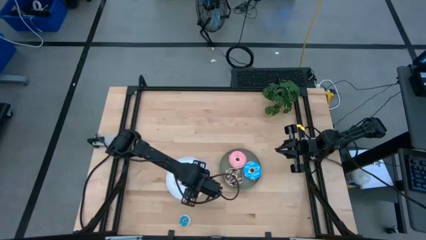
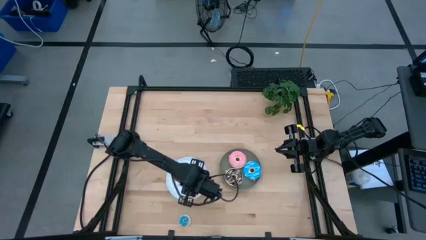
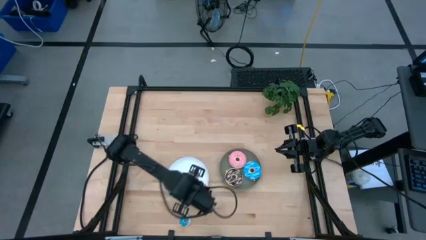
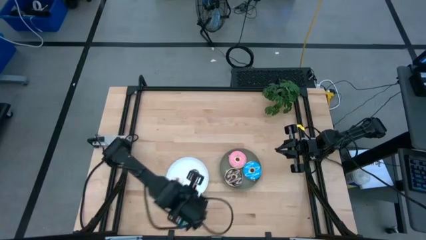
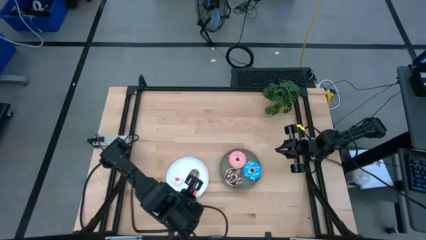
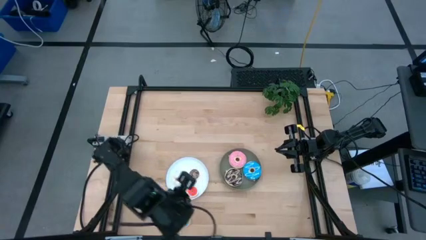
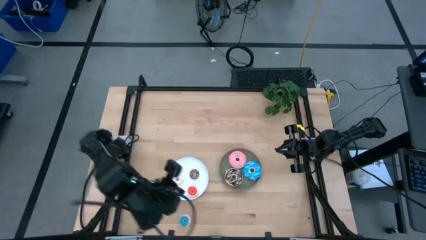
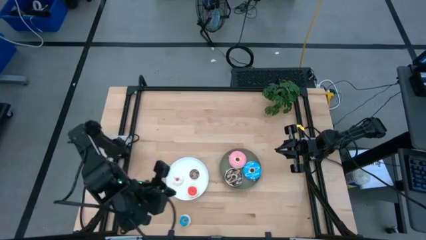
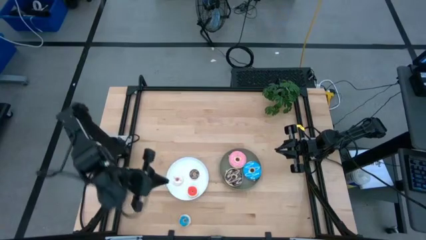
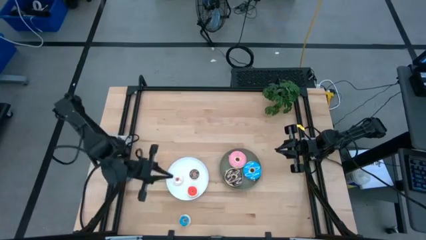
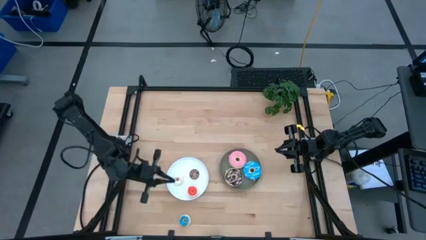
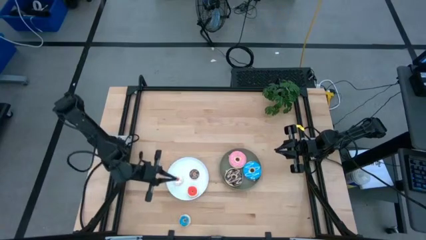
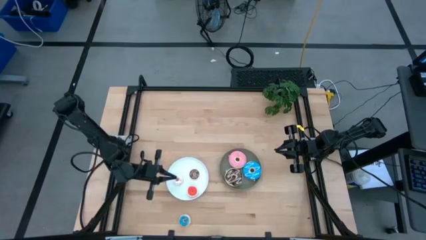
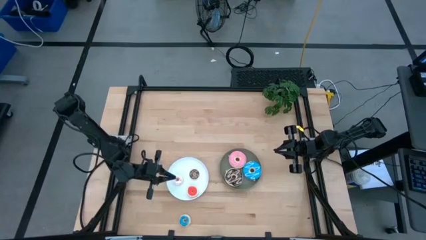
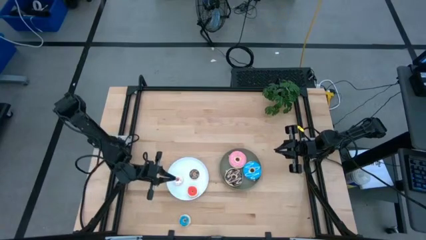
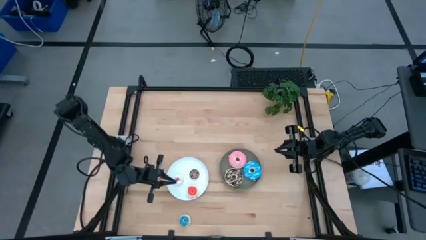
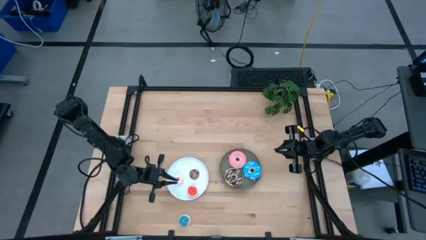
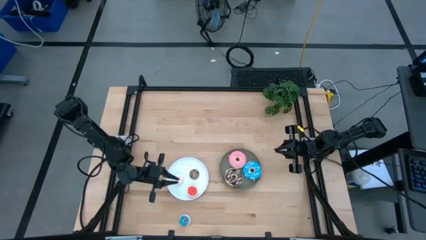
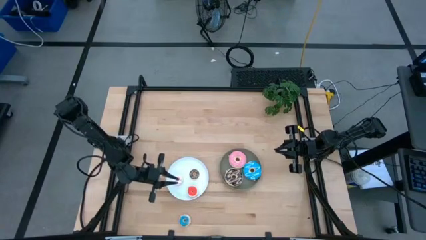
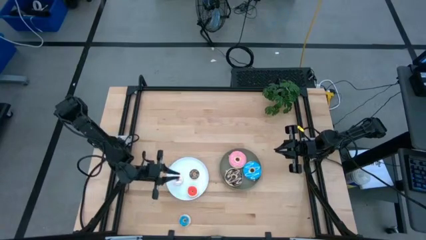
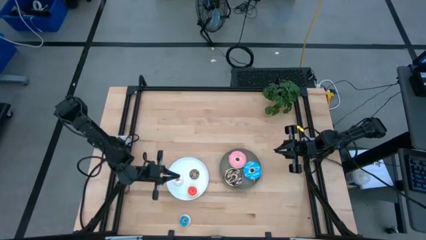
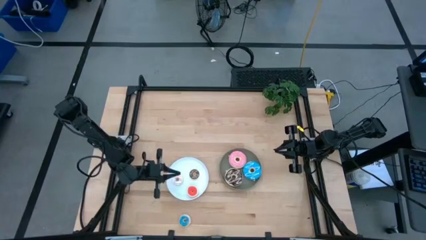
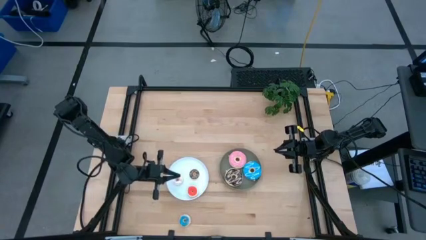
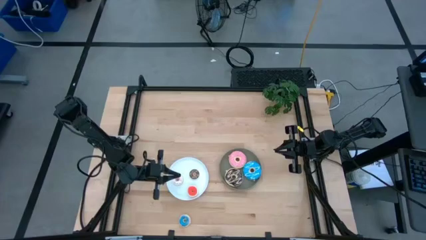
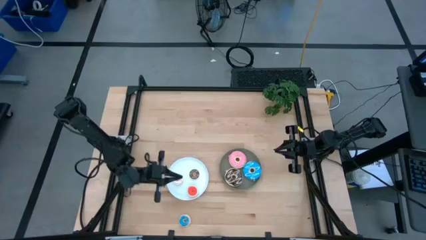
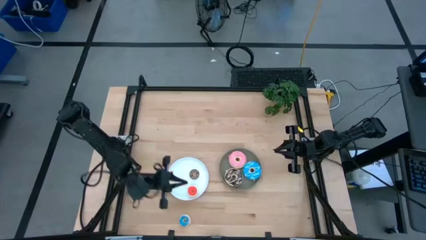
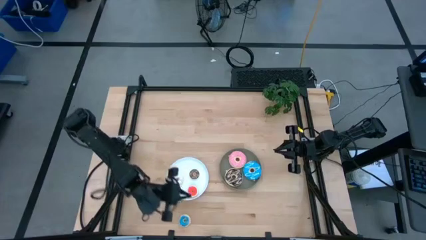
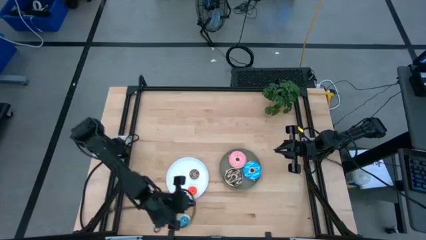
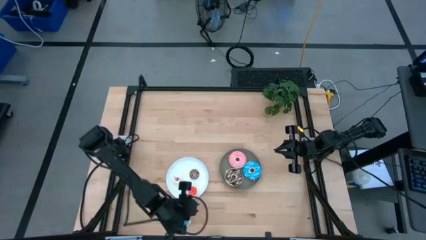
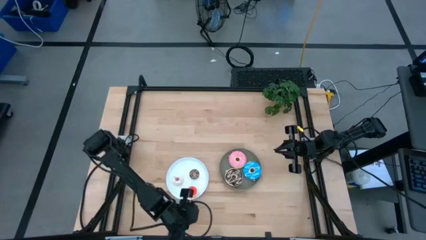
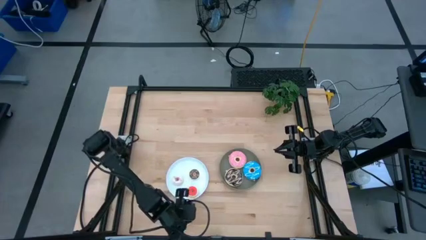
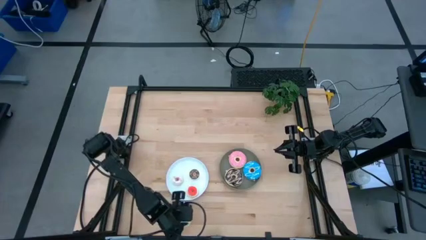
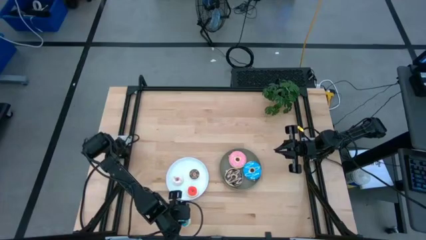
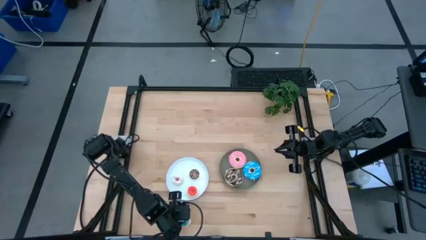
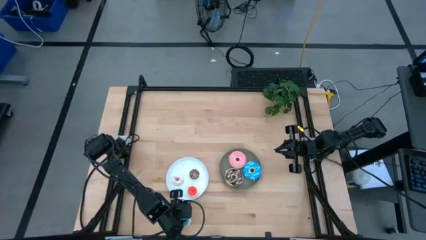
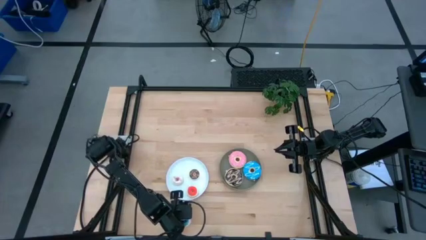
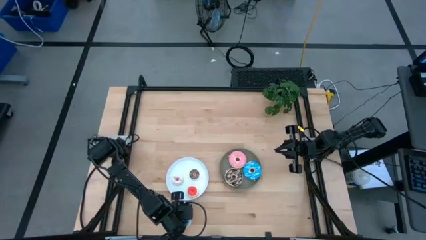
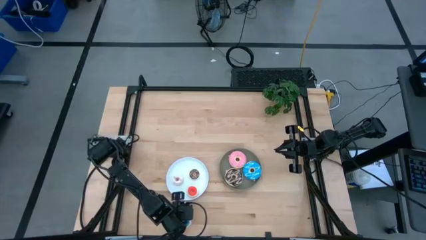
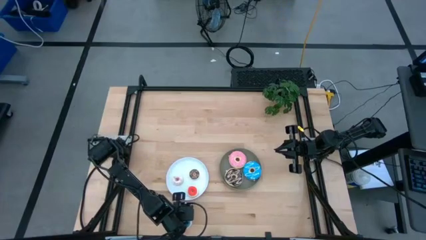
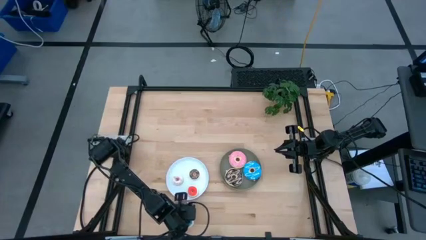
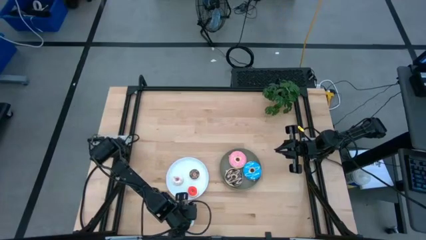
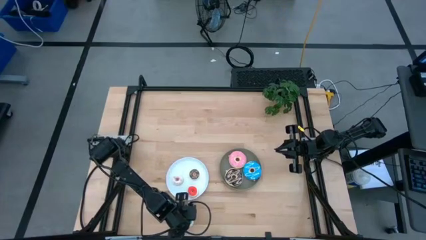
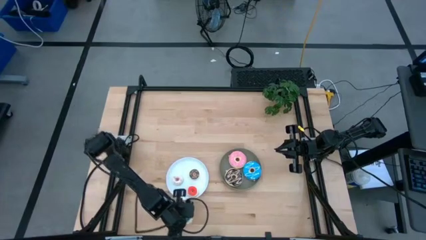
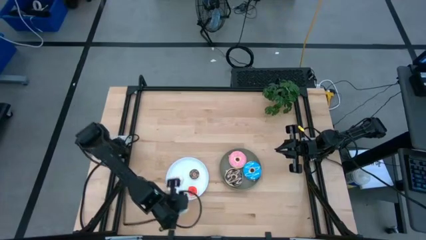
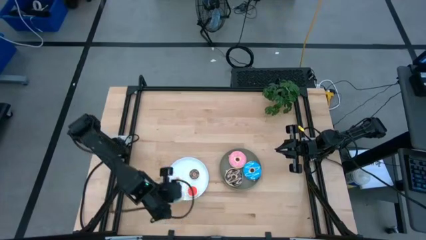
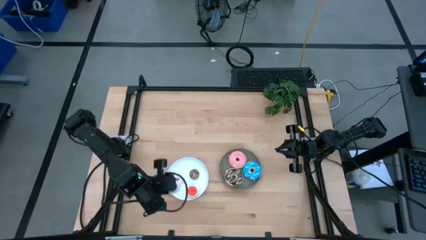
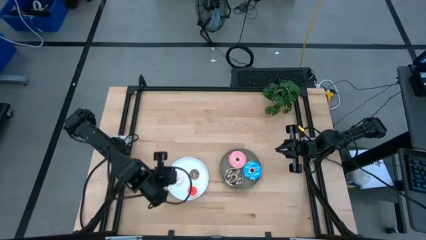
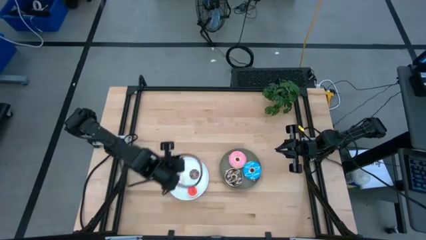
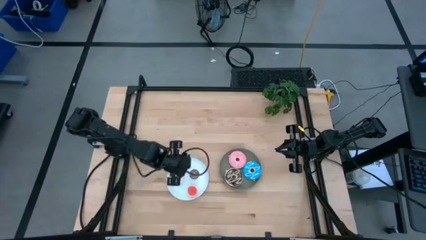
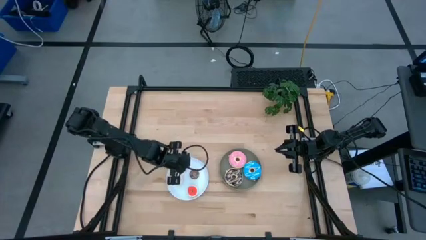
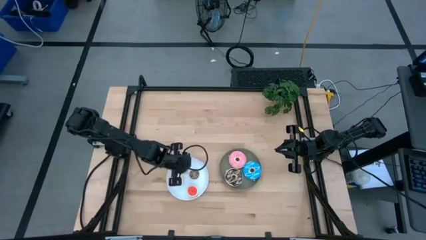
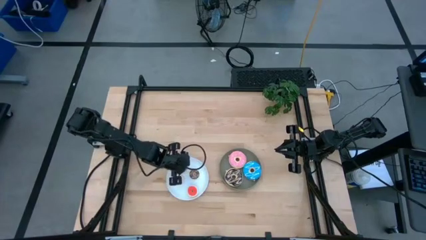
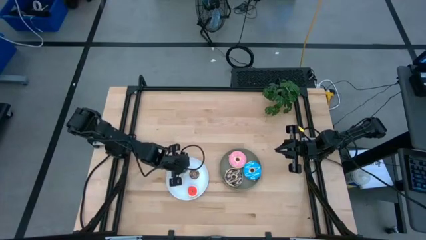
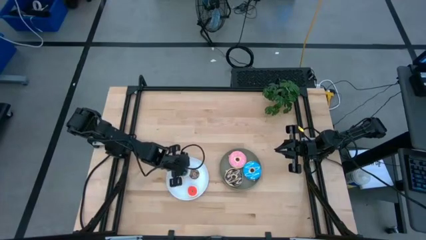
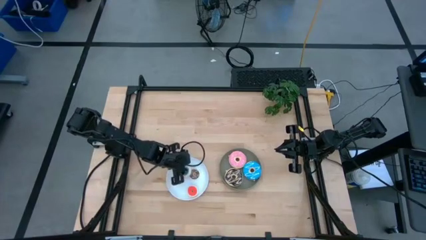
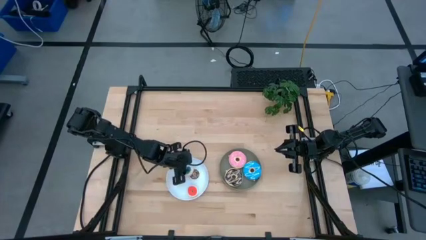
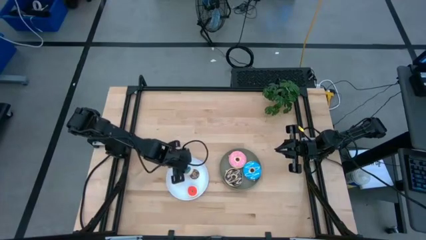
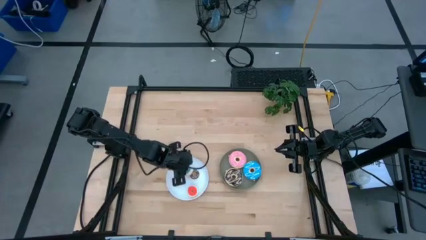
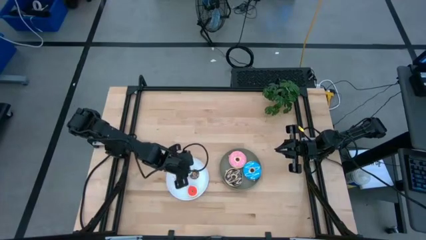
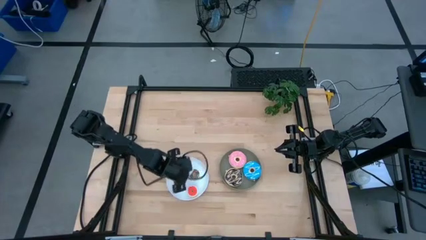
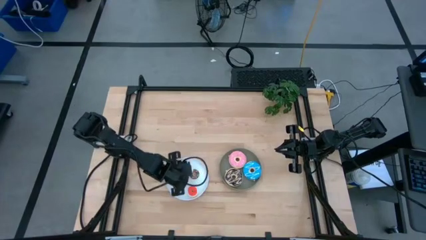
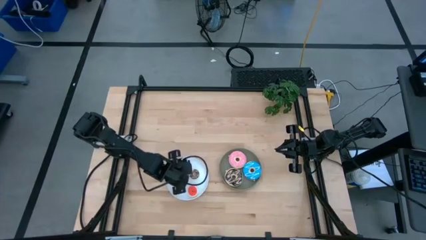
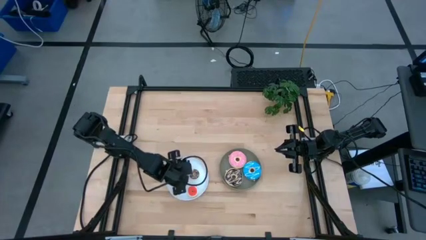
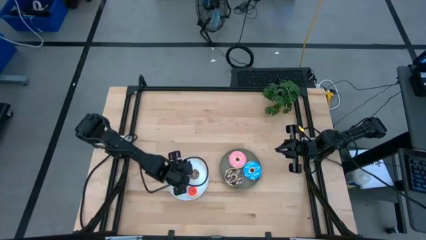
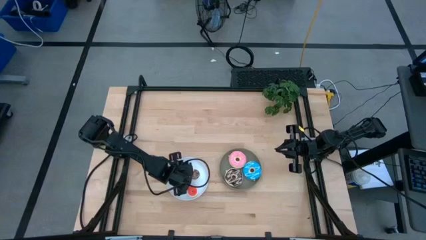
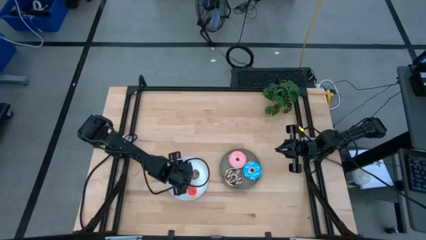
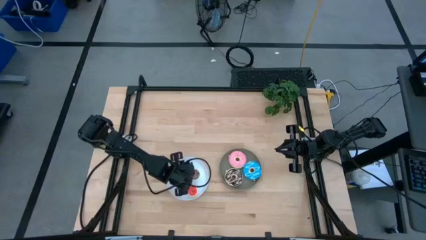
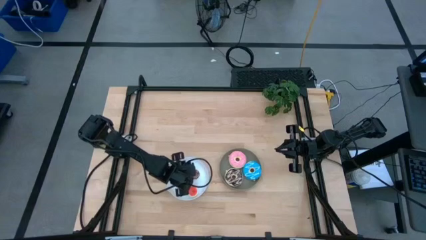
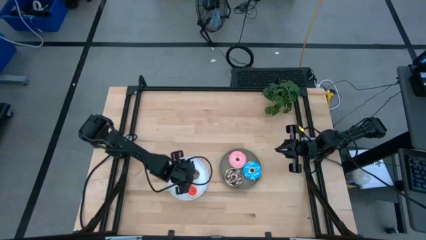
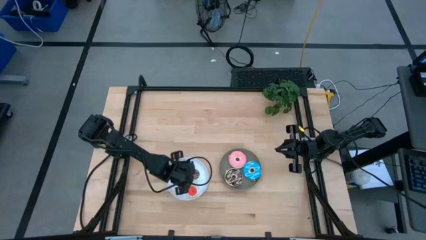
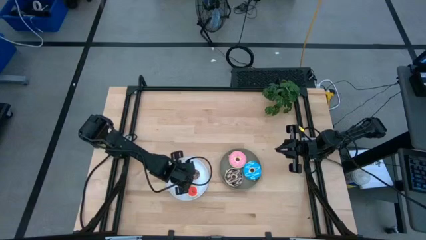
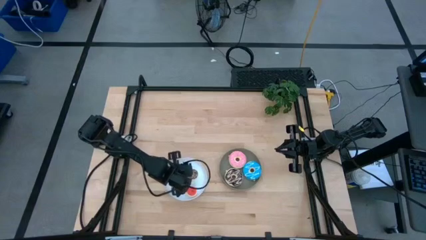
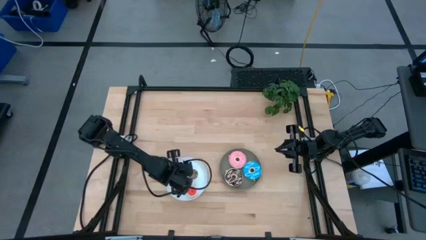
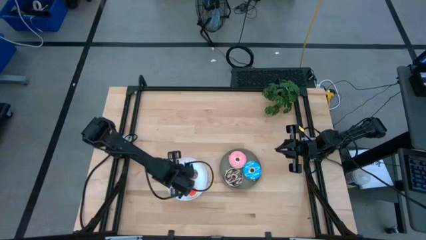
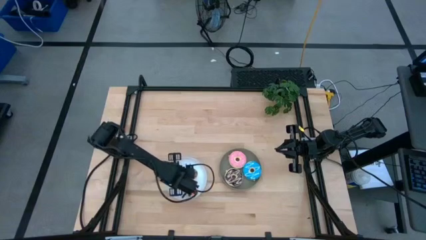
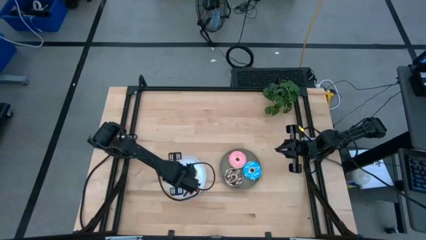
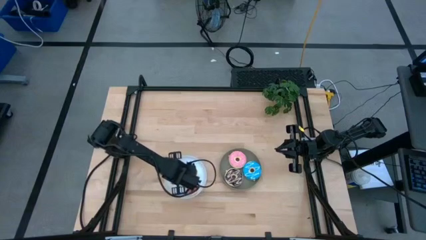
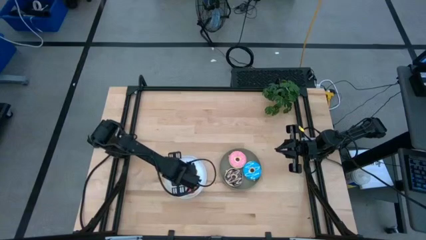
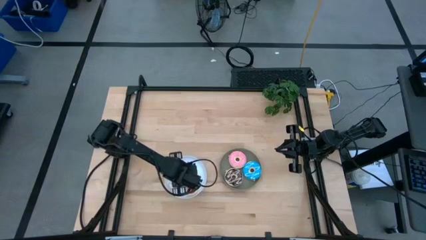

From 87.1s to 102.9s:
Task: Pick & Place donuts
Put the small blue donut on the white plate
